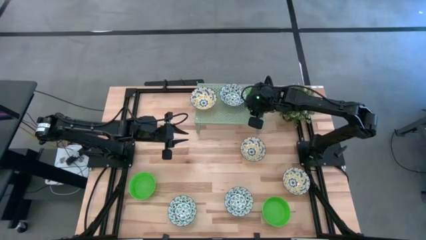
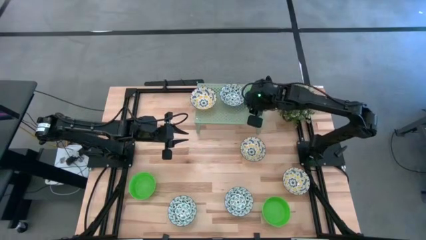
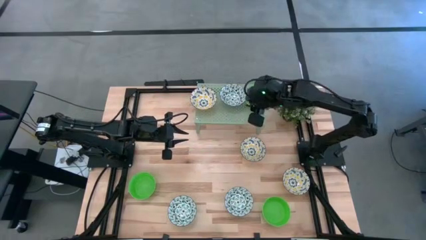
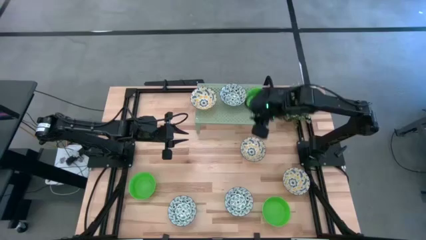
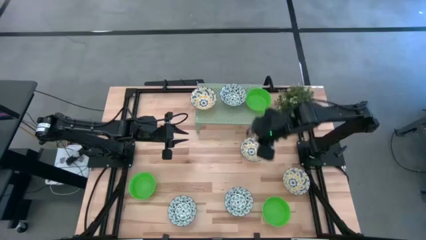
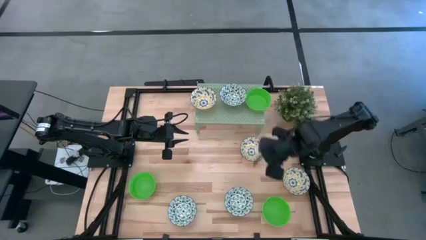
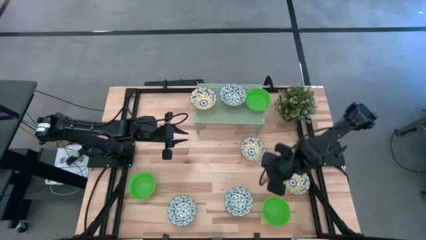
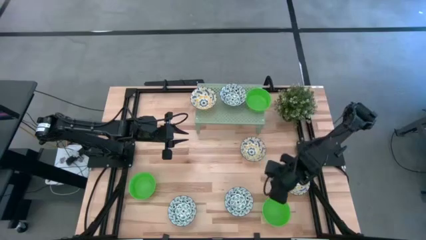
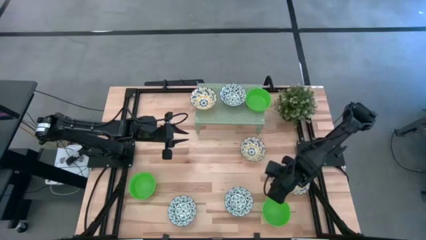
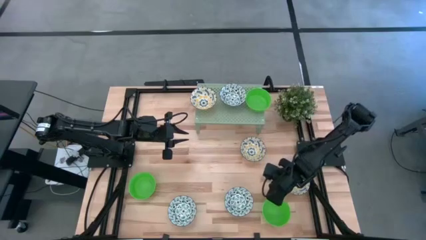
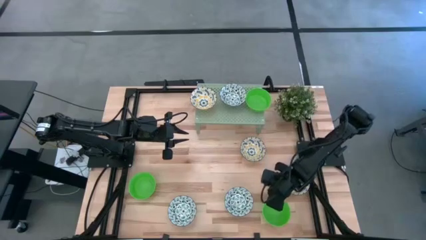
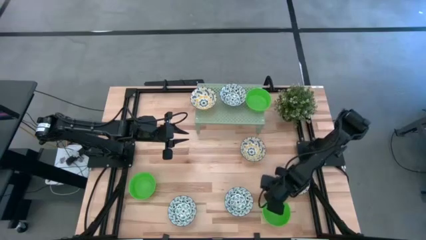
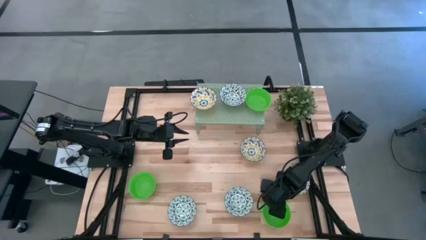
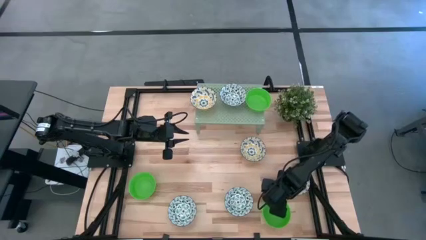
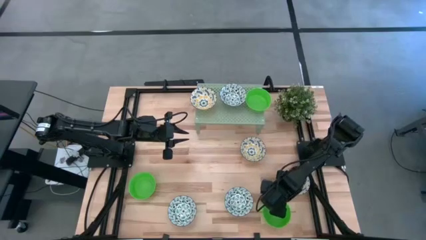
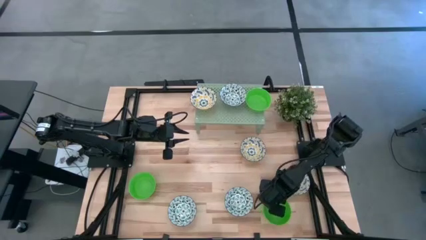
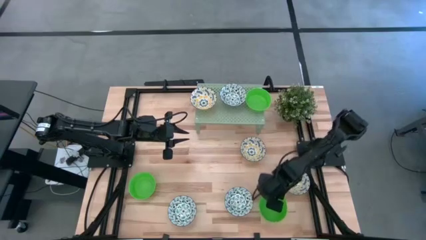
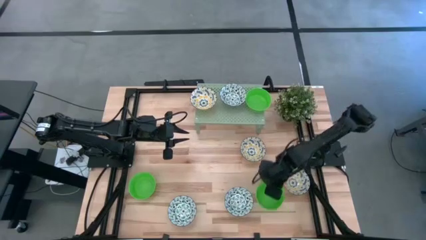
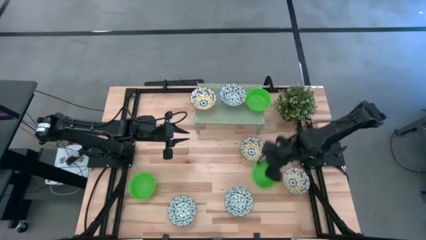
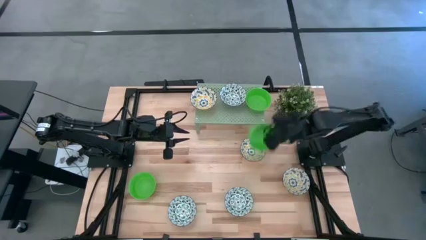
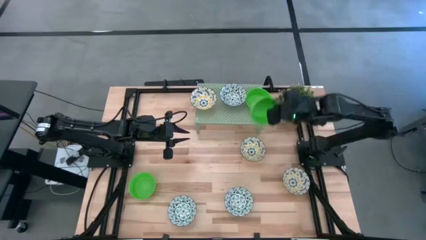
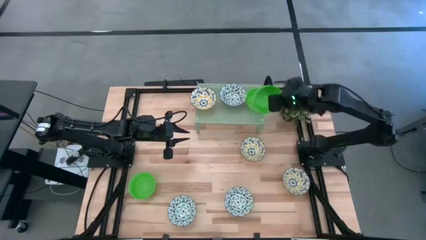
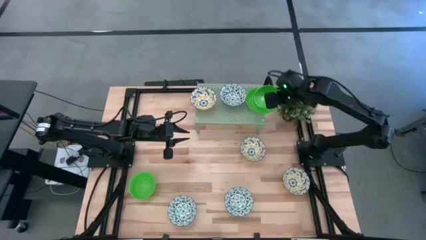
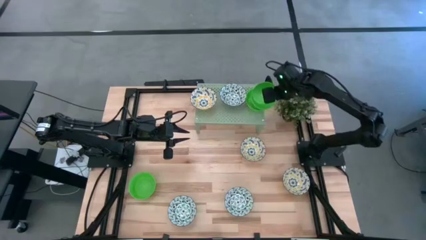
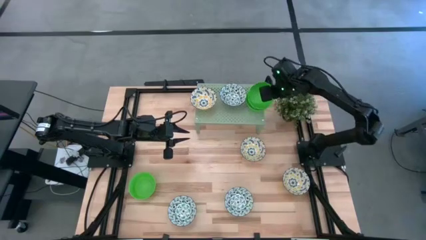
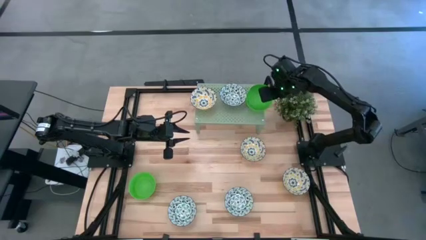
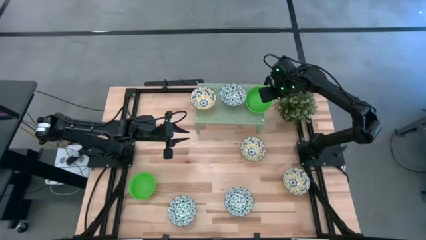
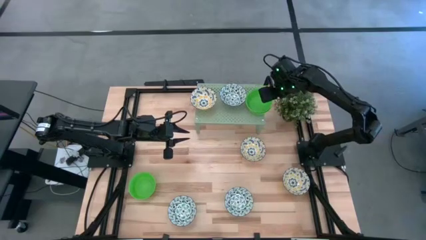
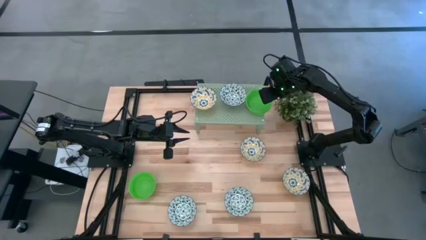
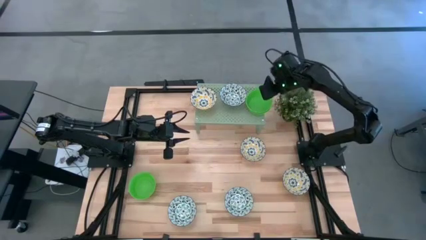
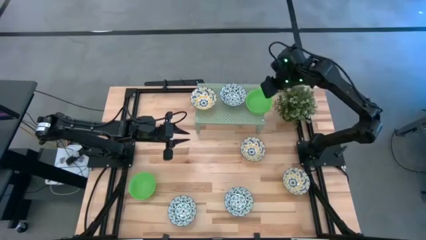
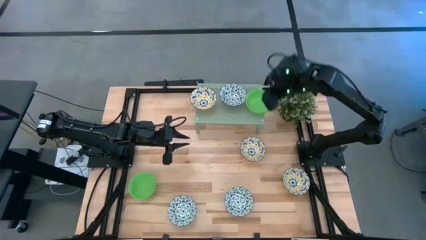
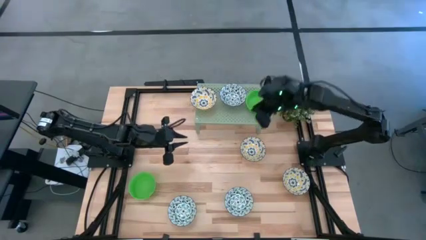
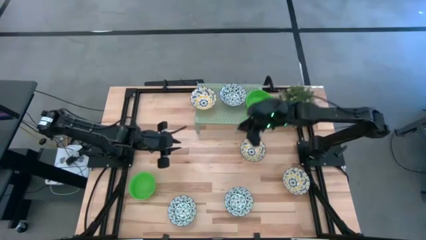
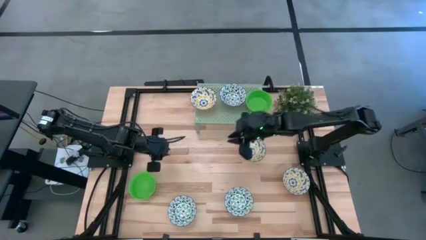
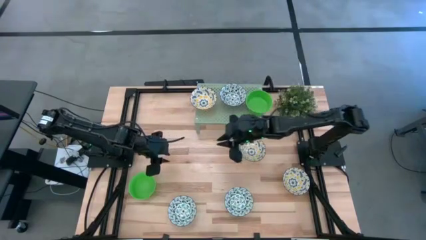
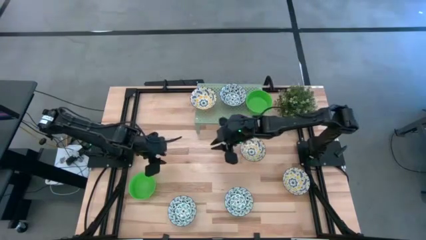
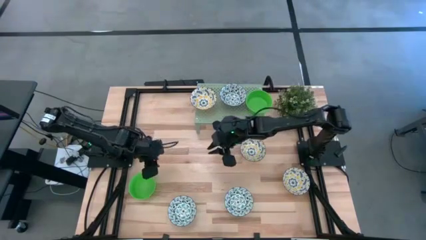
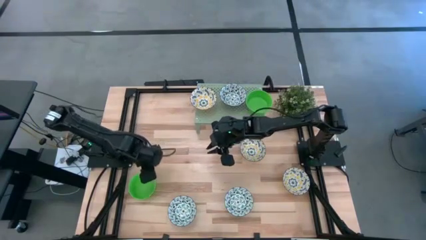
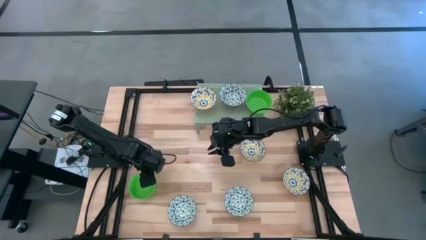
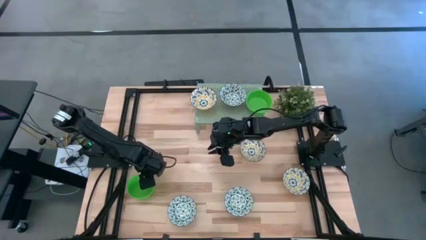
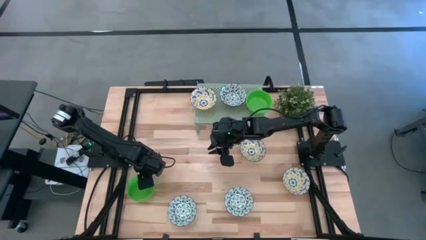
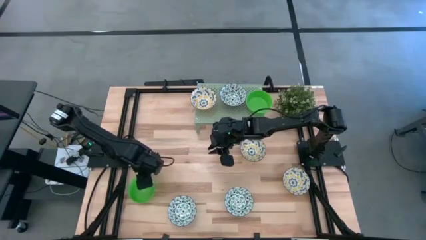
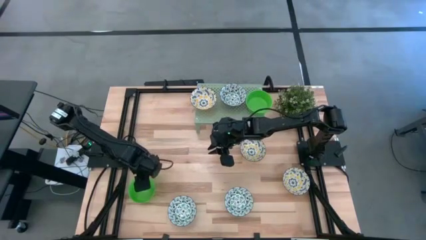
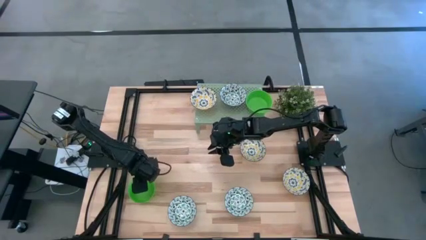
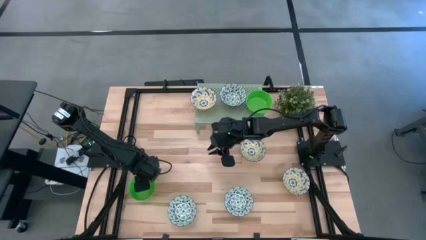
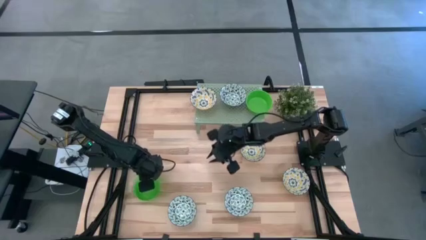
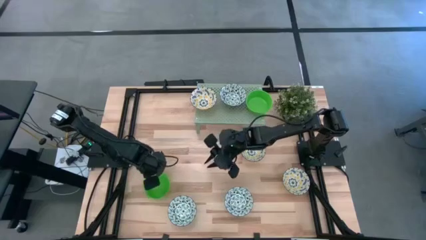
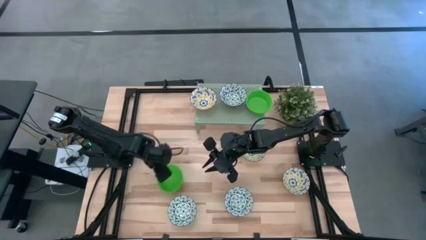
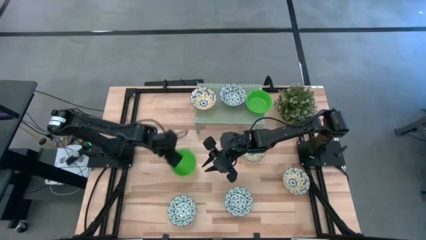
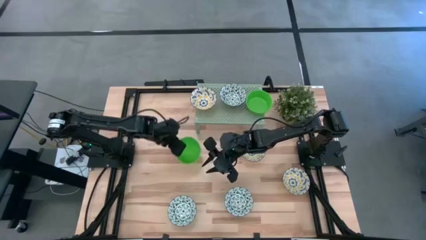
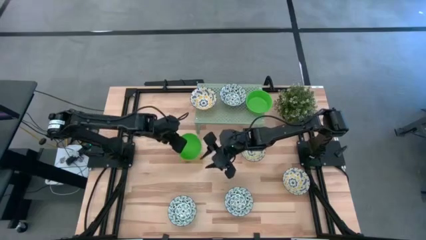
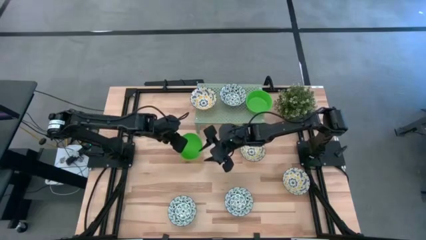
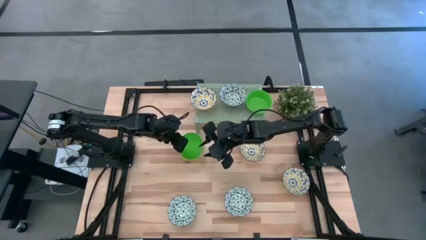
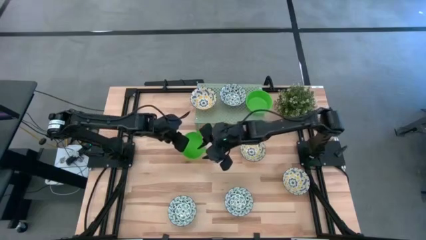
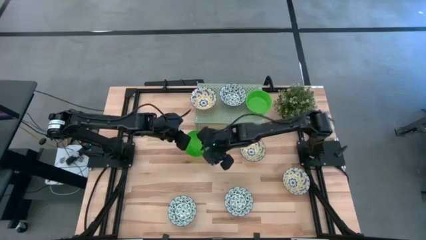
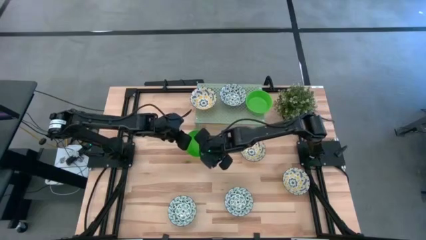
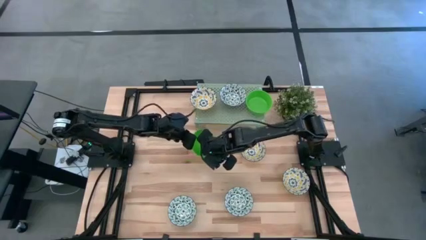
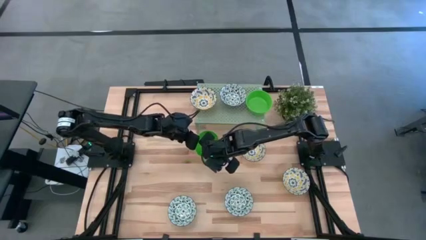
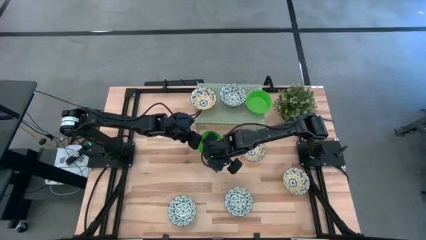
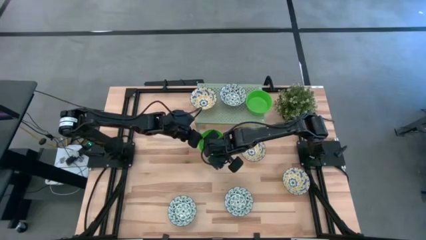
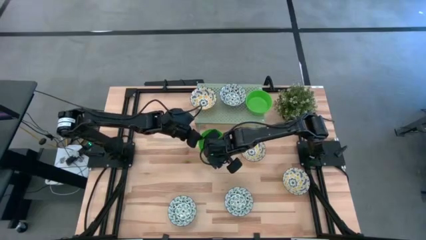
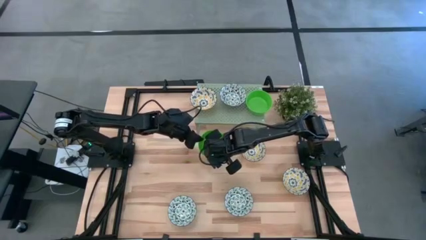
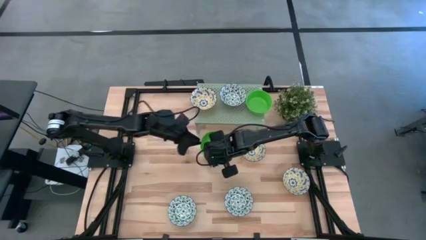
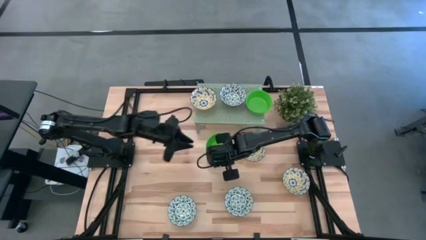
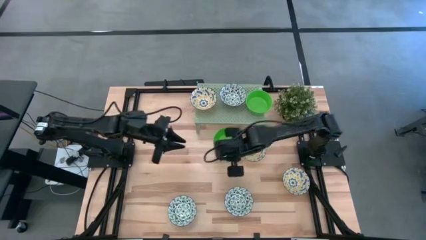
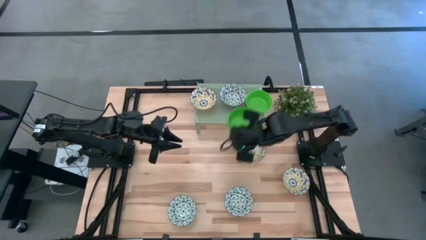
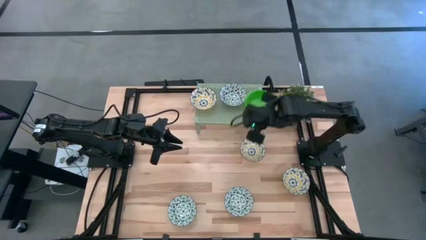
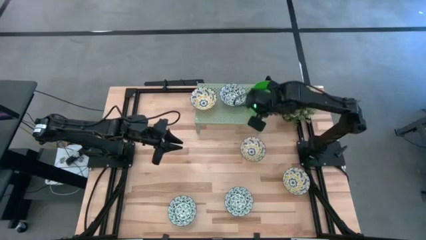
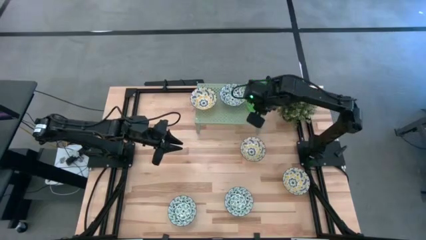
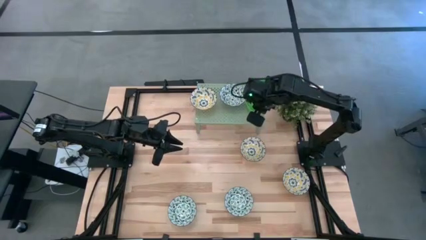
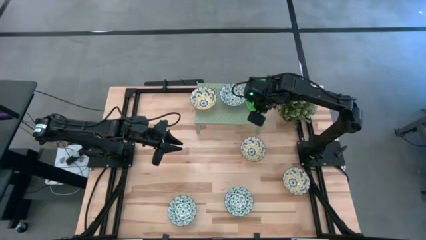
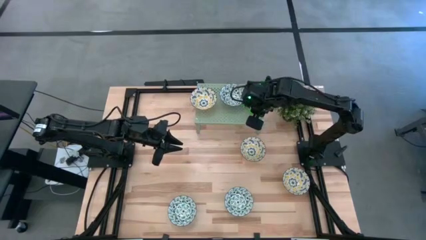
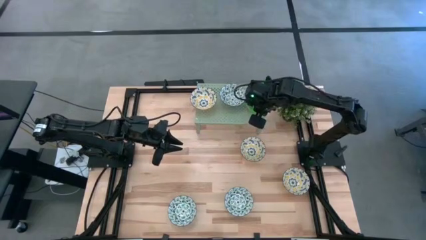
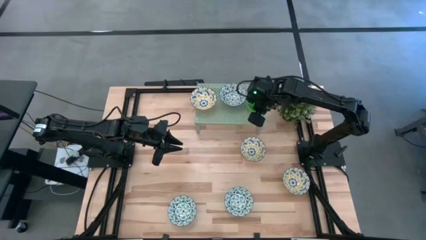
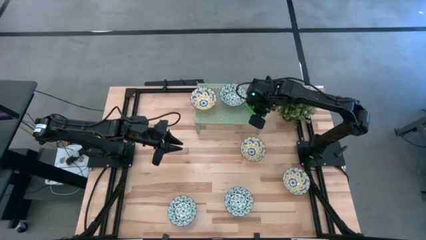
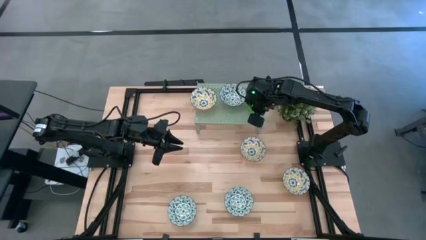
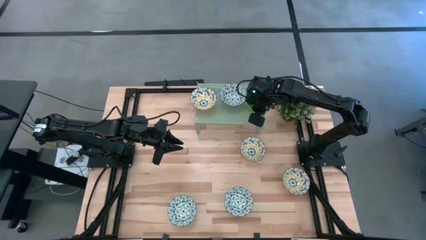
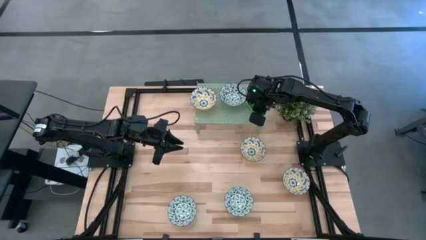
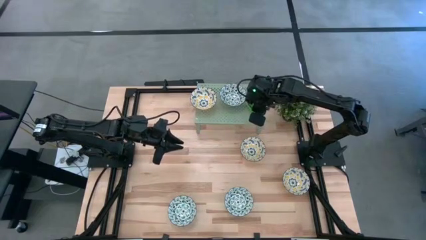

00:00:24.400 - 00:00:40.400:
Task: Pick & Place Mini bowls
Stack the right green bowl on top of the other green bowl on the shelf
